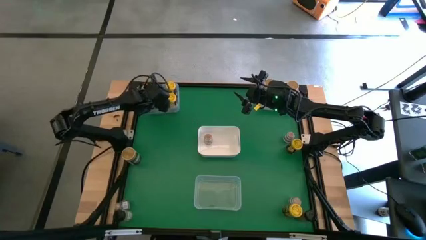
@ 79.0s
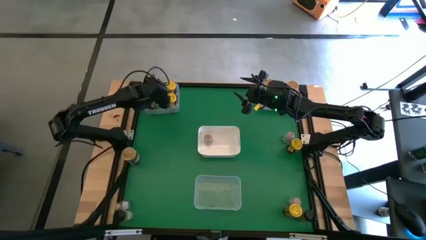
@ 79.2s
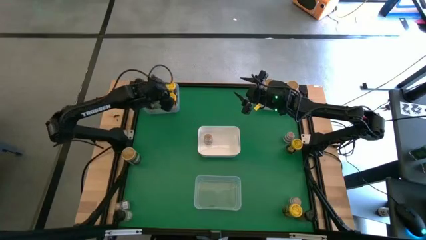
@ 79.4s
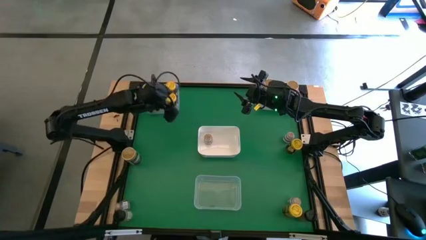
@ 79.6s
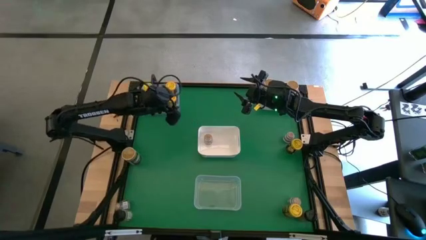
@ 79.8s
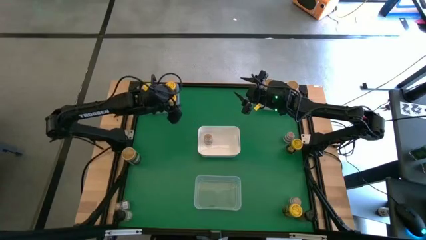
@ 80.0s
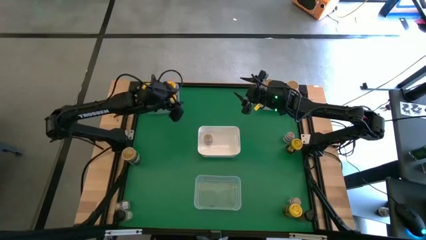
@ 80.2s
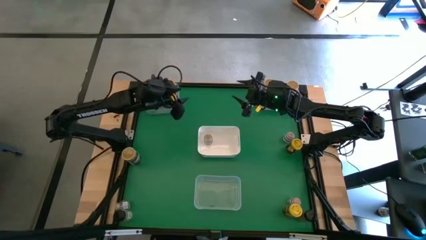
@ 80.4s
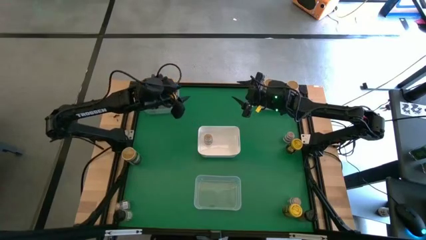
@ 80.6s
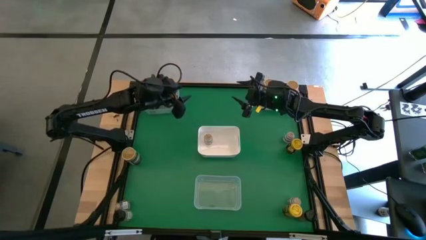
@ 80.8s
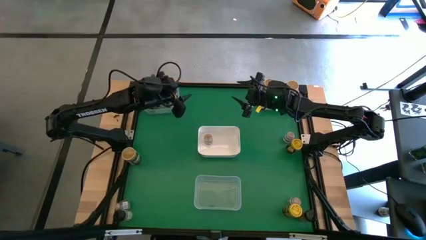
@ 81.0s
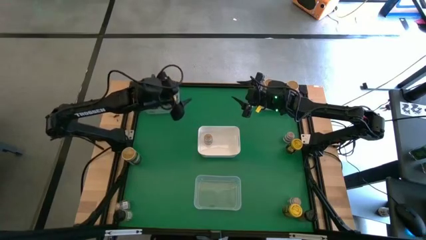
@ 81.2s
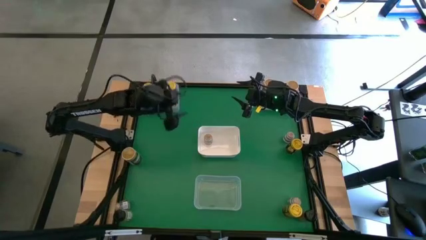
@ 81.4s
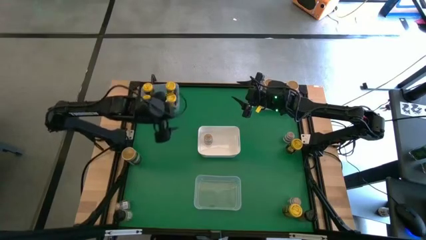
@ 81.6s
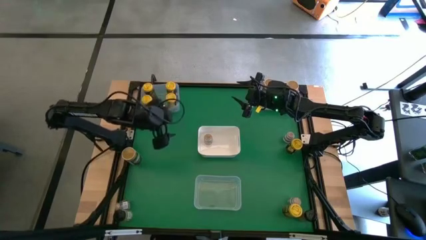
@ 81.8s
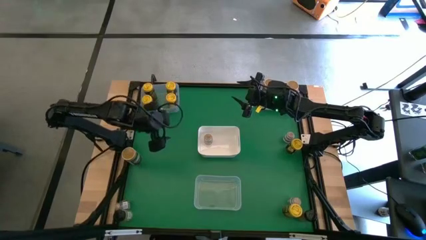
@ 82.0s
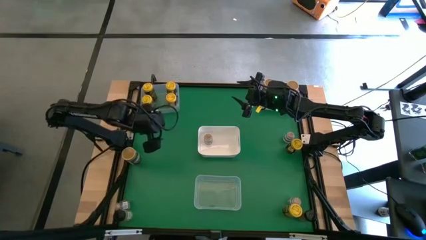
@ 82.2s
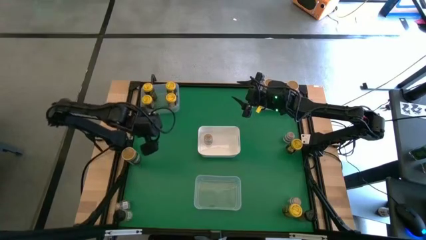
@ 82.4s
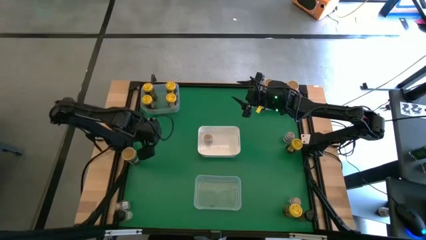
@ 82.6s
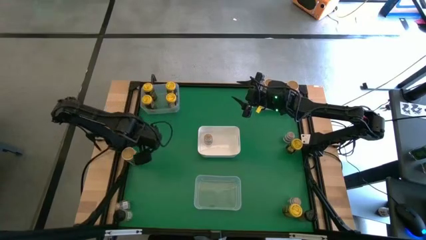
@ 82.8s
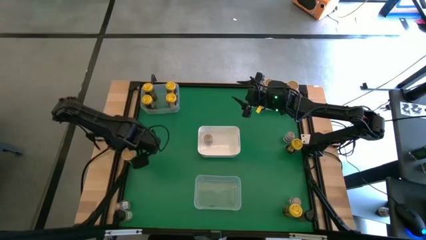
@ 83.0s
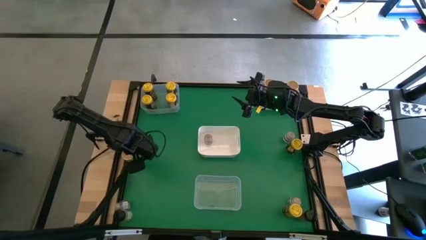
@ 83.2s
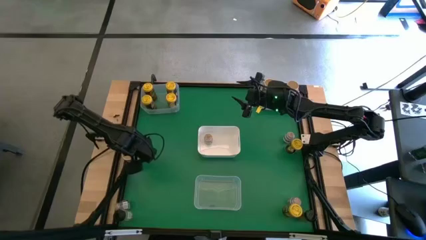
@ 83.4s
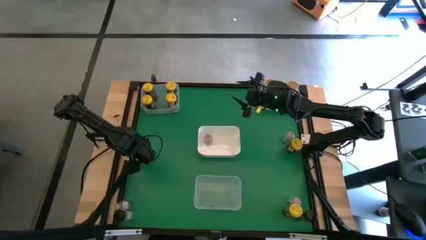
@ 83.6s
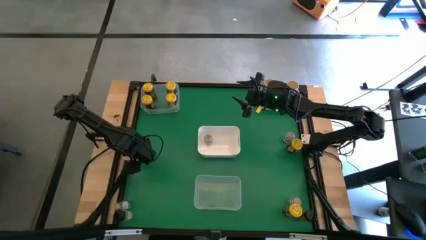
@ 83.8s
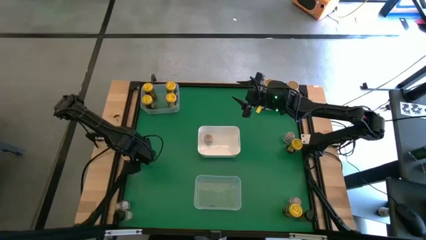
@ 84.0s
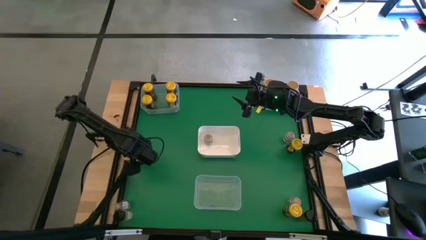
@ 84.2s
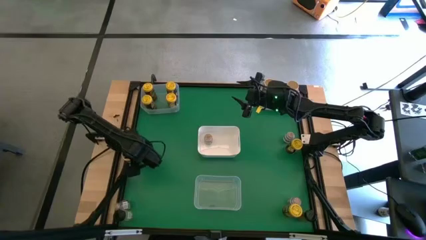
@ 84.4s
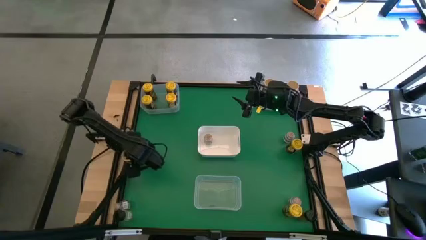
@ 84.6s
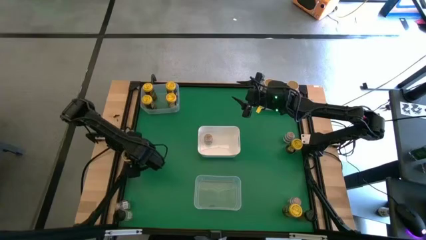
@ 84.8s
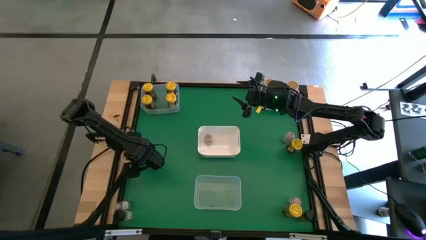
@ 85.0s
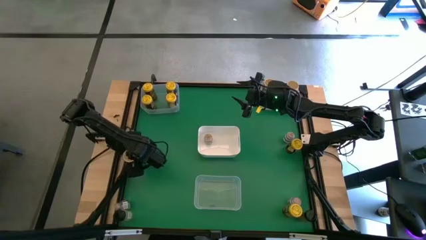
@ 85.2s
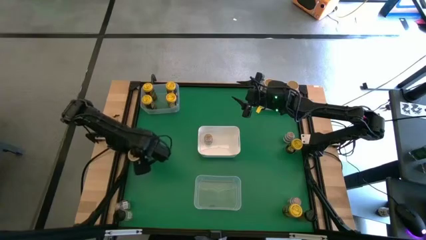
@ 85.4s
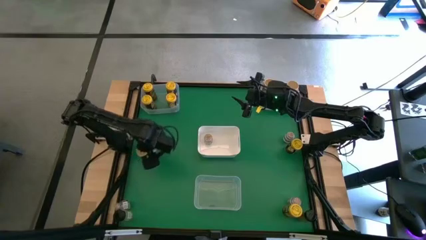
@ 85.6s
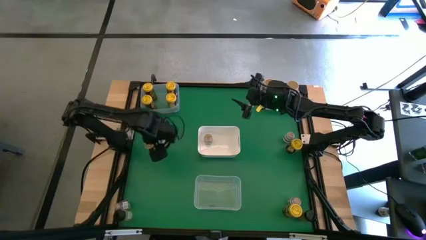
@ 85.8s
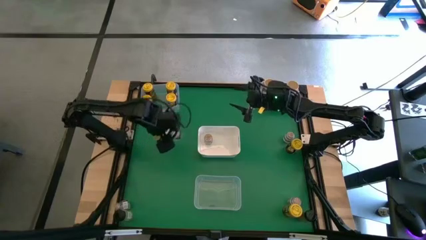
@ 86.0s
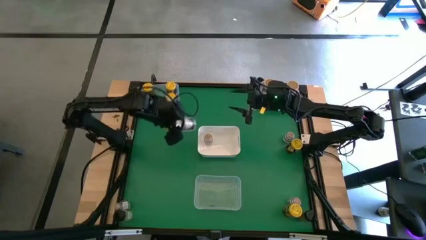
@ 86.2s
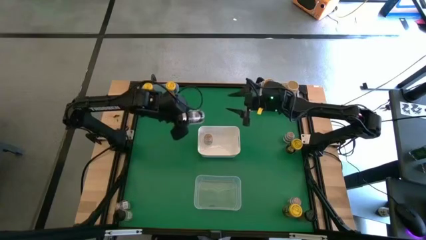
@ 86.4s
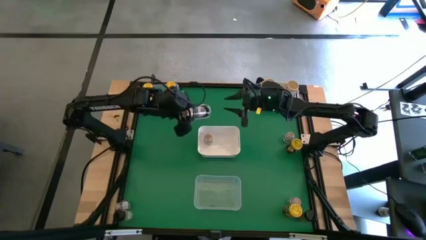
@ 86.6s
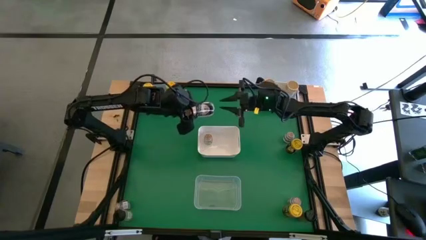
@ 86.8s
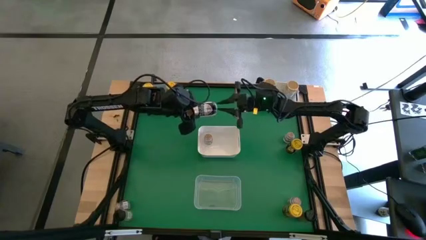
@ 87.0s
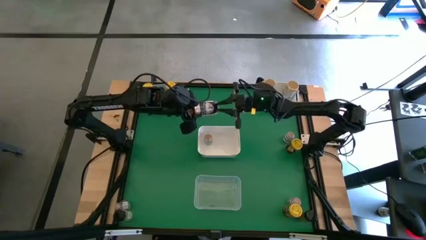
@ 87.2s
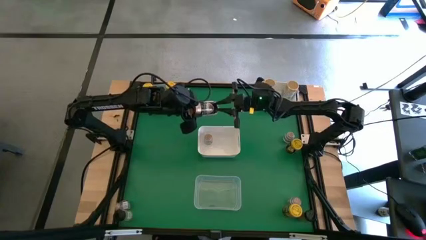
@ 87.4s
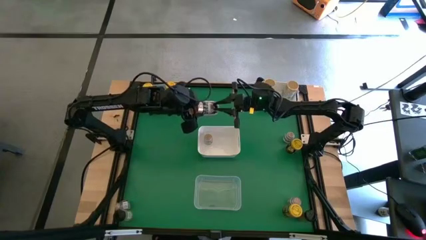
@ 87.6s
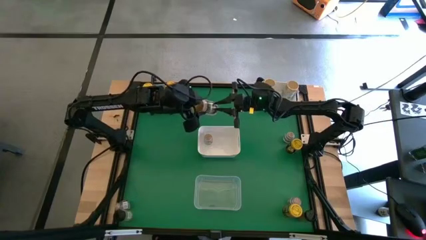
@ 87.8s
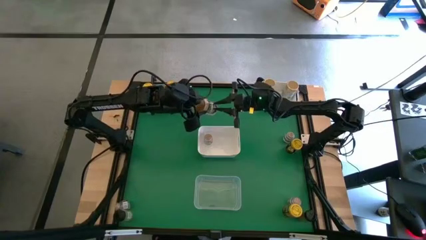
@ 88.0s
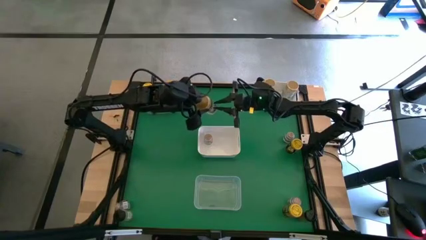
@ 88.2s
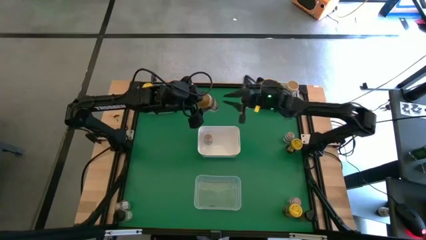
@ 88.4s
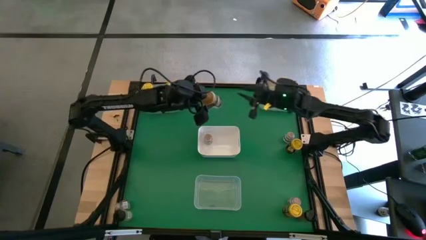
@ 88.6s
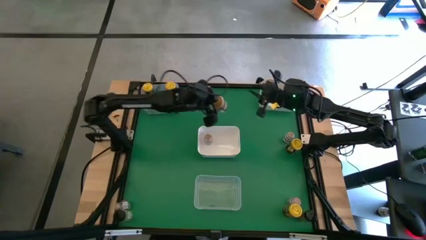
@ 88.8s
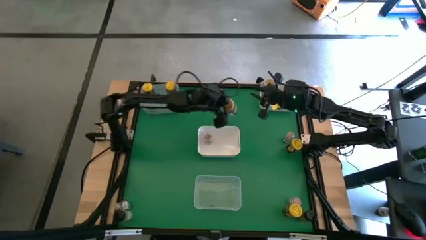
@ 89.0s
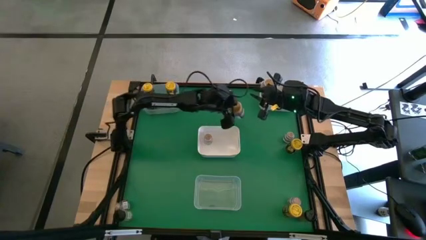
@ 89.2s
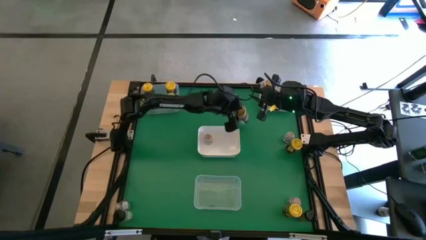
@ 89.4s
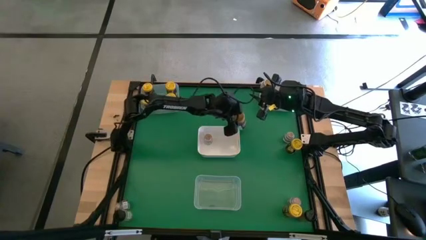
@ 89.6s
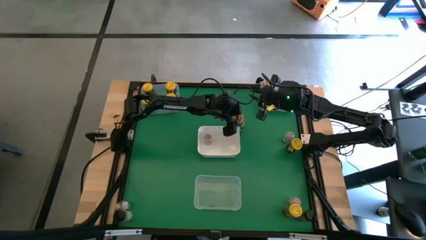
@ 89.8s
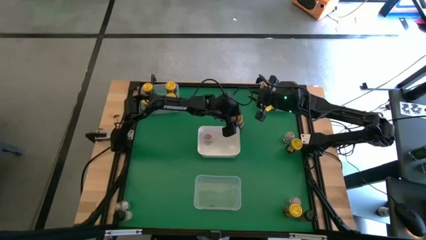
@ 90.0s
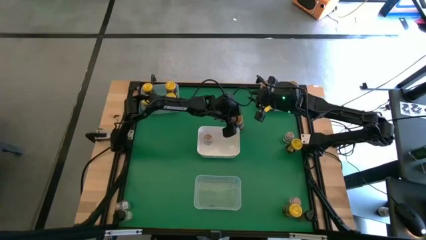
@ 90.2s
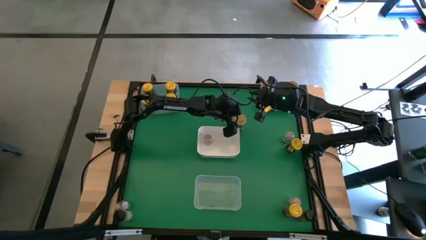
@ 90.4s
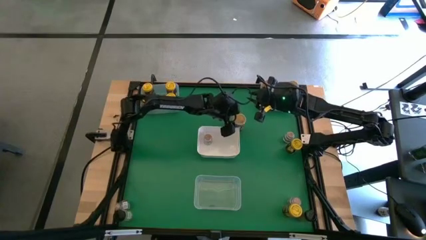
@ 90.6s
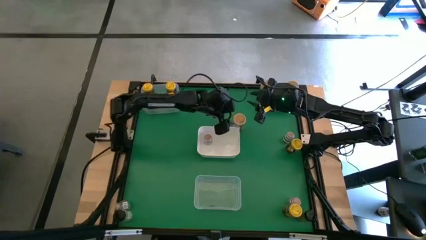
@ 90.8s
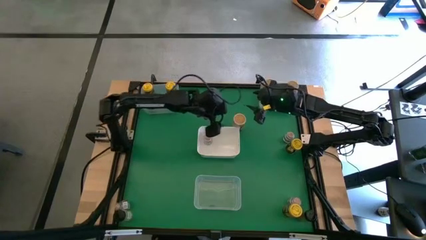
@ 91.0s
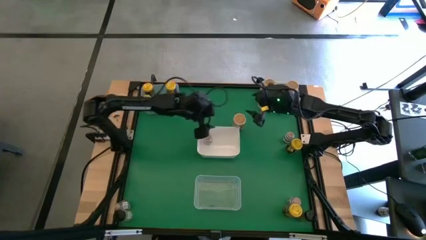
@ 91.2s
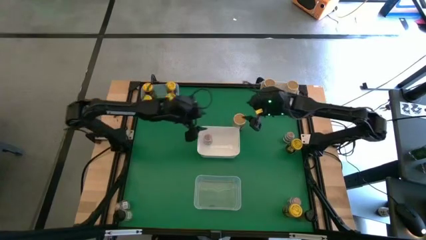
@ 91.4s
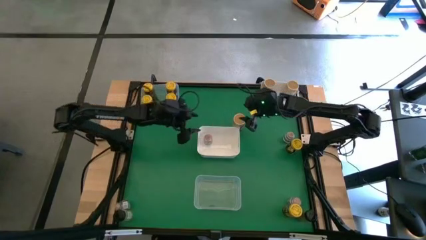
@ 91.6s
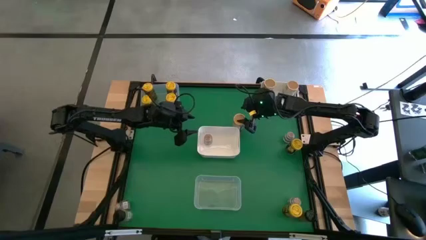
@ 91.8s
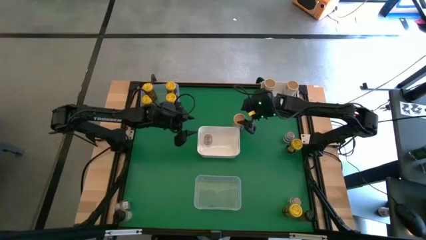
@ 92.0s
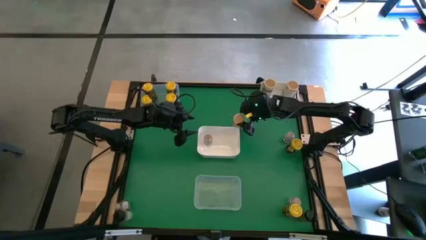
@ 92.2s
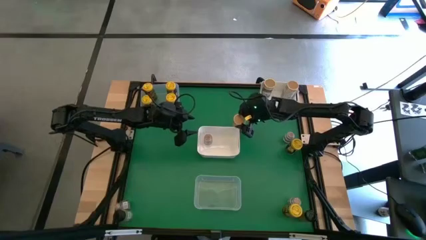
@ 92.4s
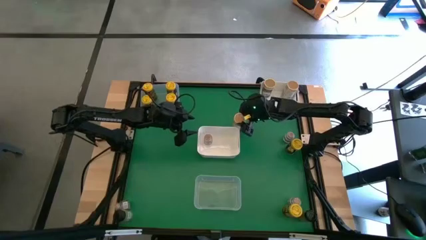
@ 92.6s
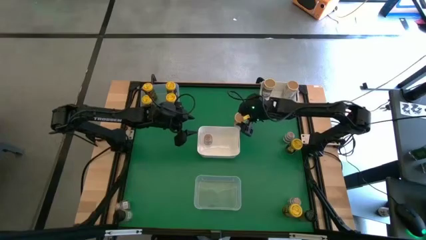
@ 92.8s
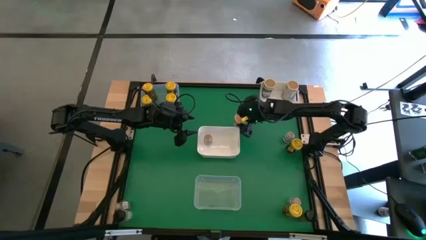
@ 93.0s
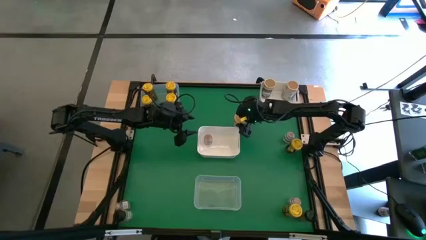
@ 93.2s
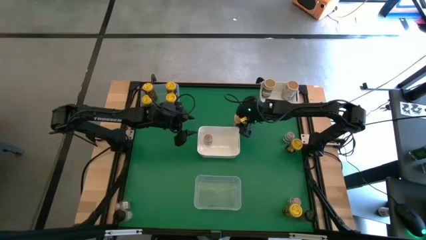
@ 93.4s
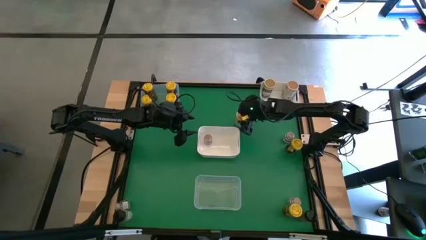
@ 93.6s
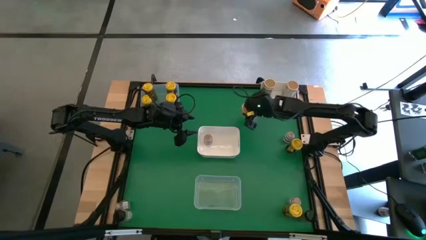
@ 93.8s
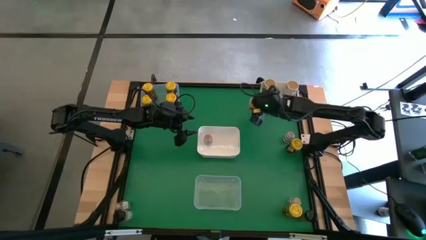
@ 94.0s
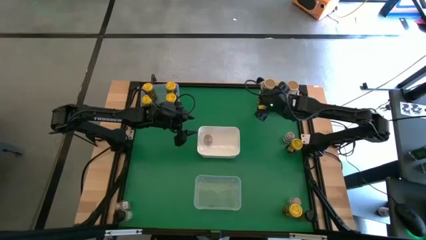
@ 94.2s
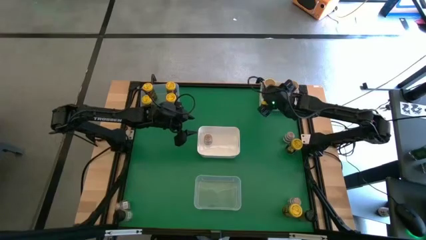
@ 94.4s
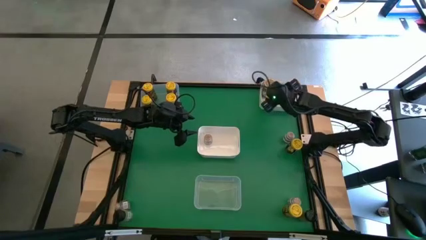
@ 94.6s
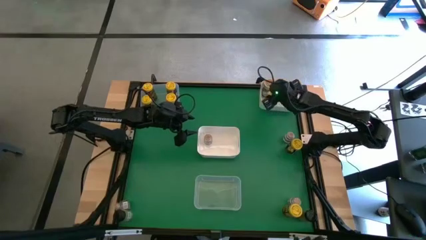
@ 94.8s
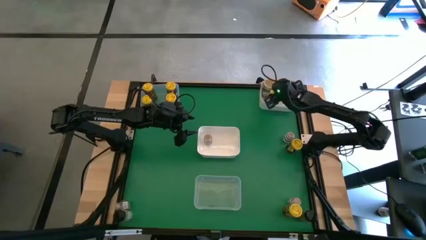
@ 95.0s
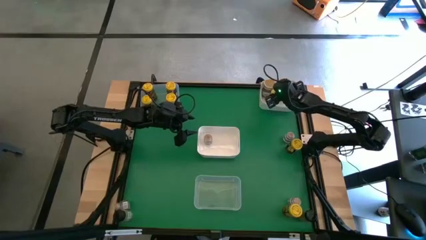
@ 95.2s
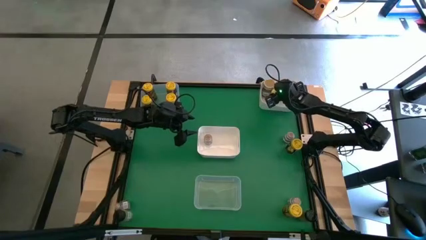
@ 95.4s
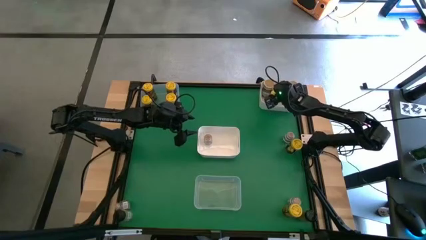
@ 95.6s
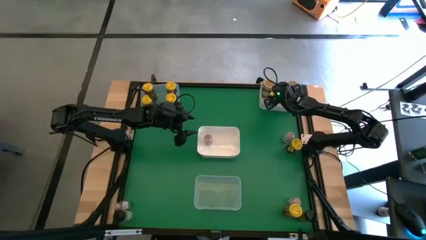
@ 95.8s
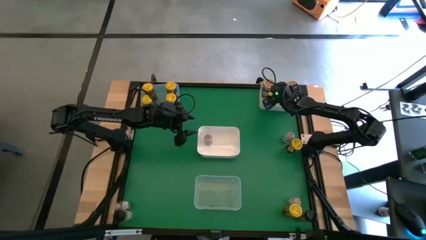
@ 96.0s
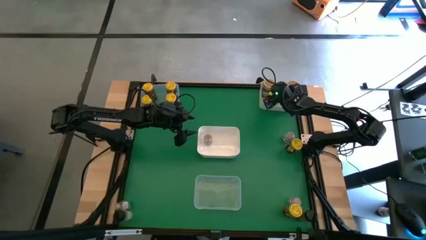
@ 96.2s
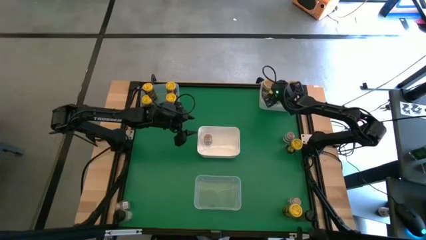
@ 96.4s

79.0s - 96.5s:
Task: Sort spices by type
Put the gold seasoning bottle into the top white bin
